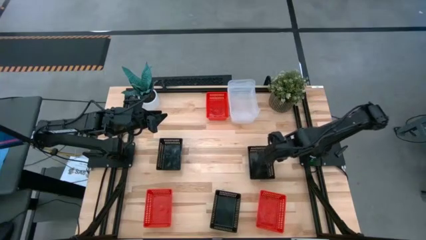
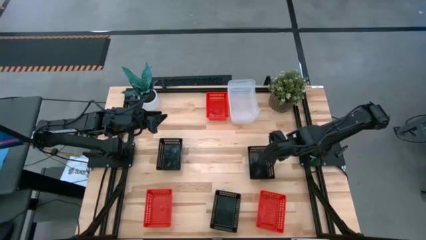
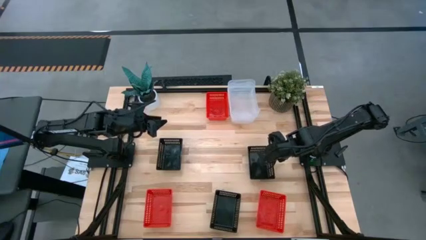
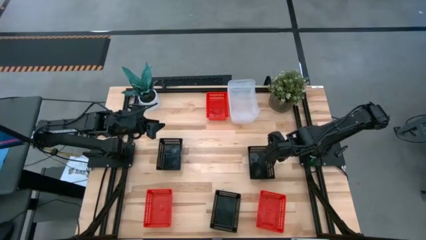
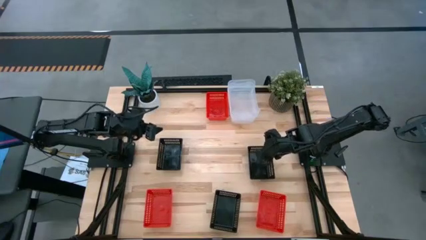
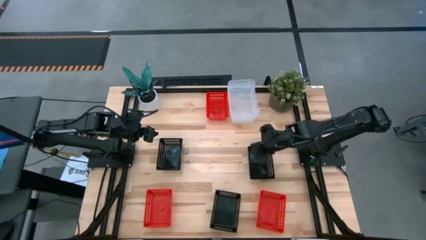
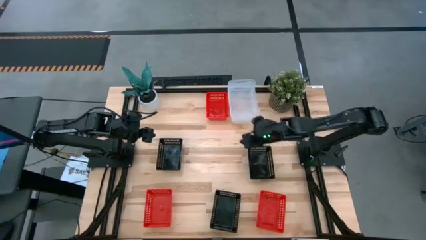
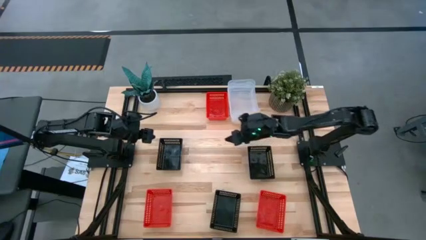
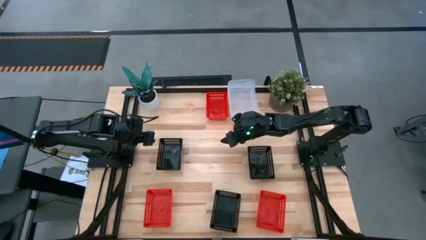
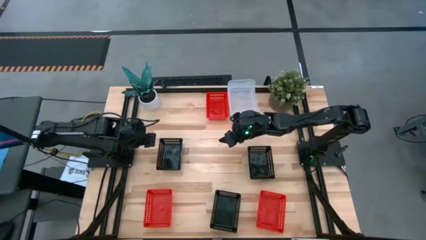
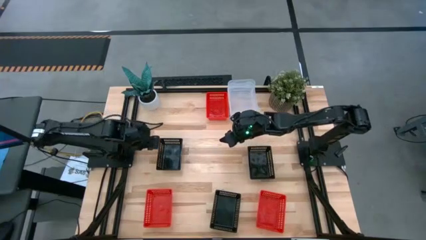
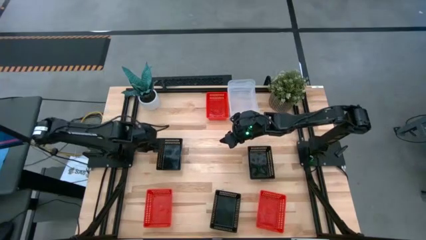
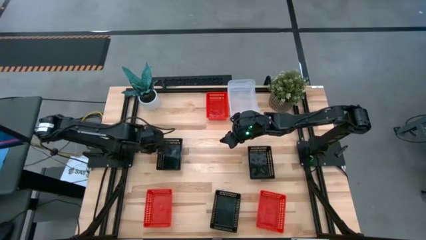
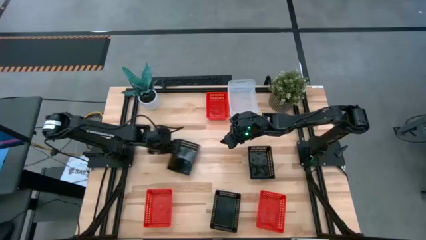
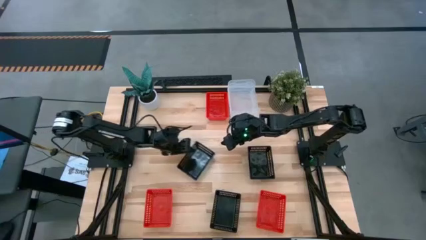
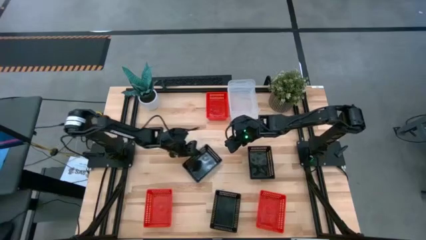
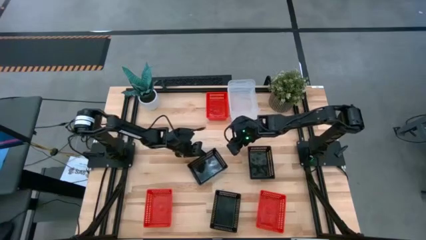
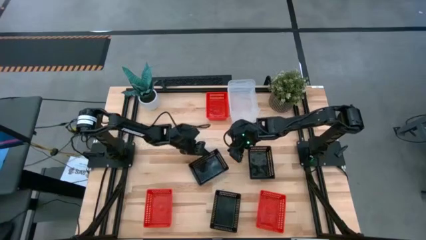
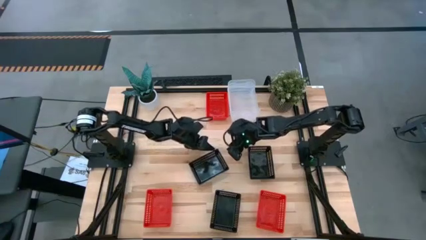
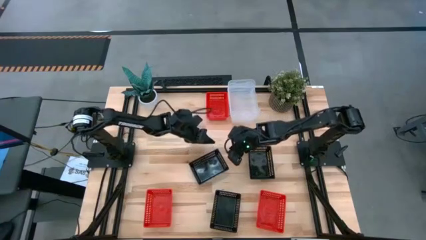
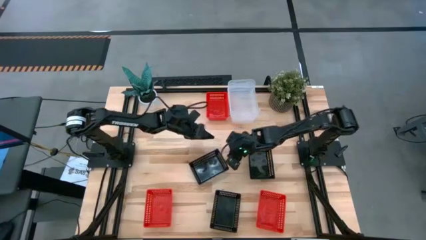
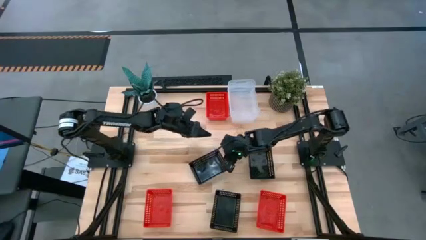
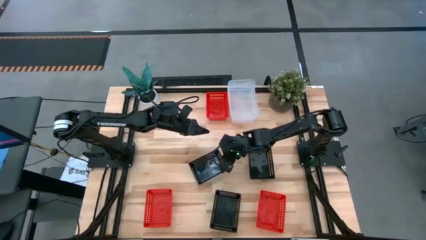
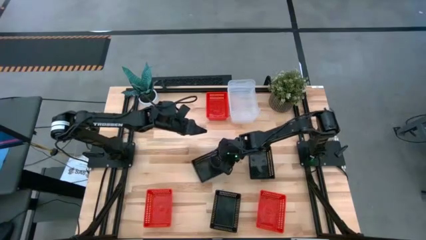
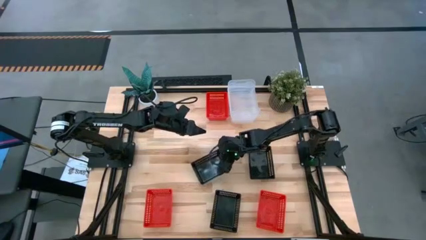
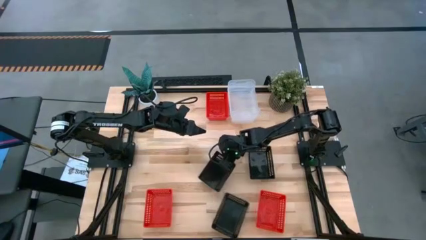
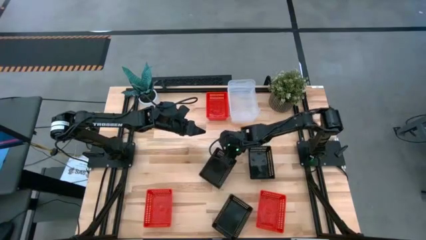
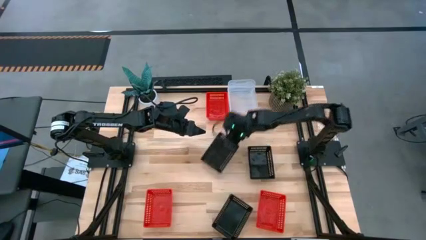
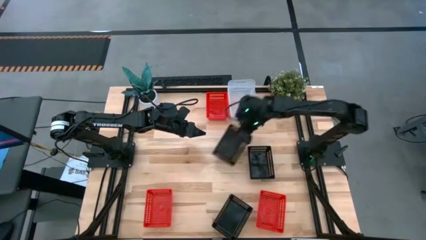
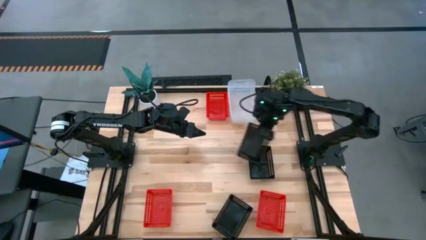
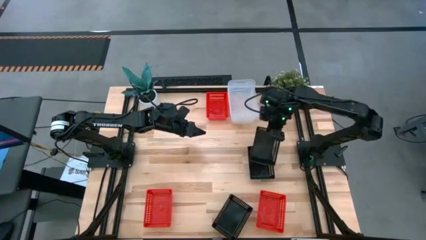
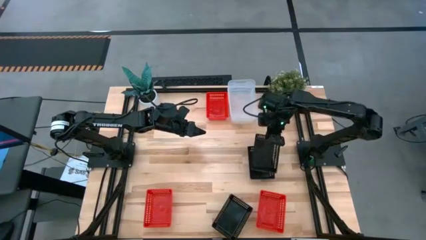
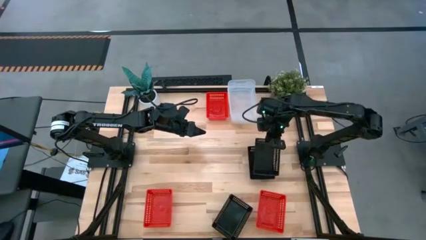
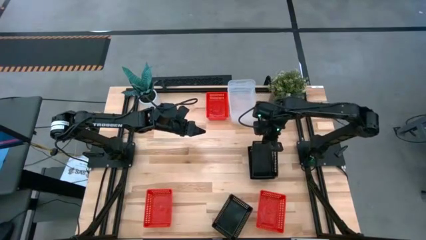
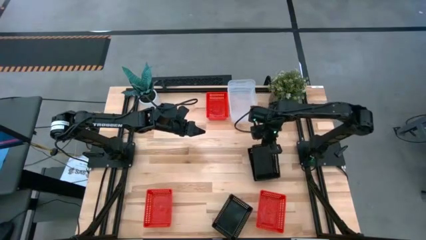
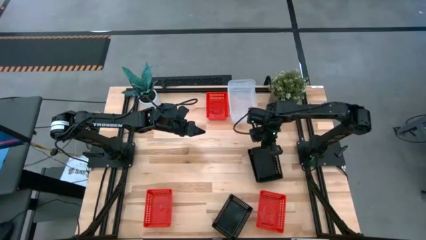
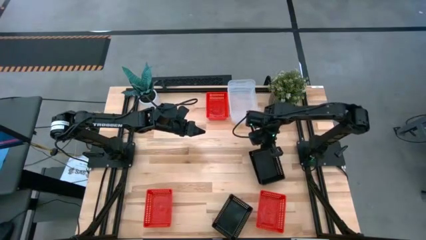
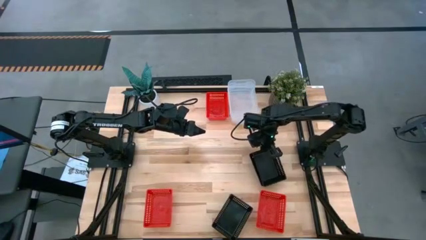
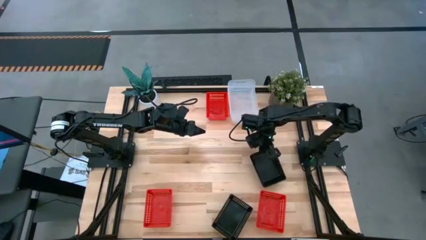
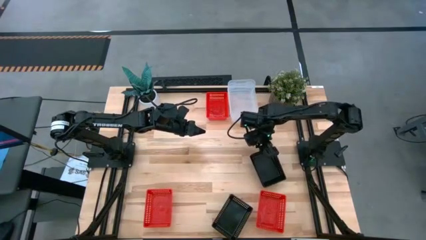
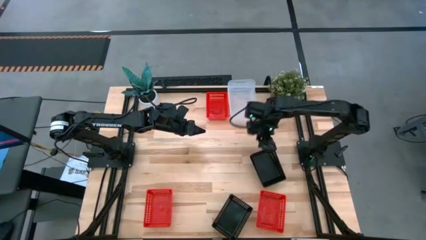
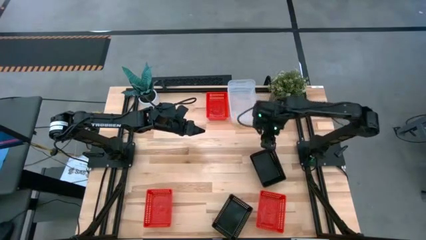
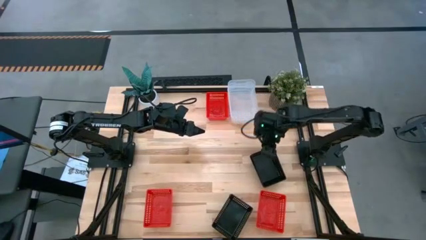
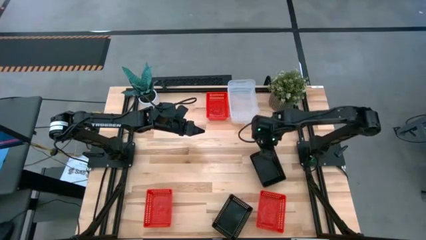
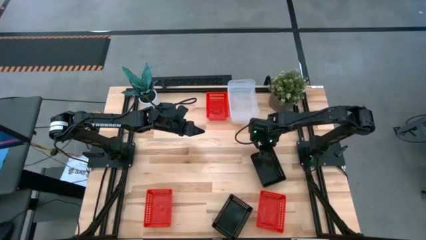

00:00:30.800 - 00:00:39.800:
Stack the left black bin on the right black bin

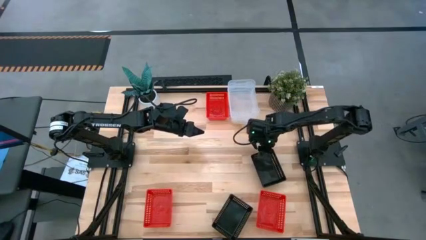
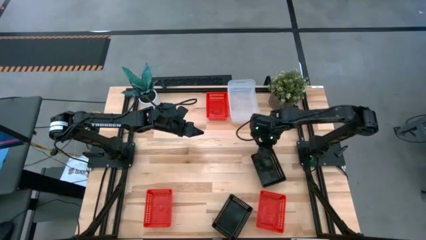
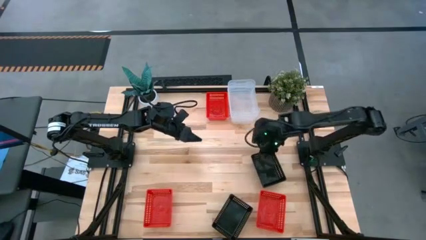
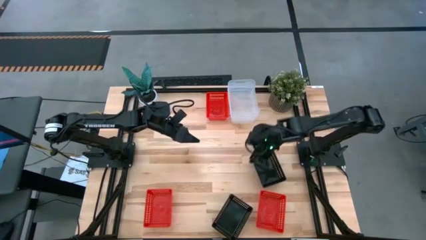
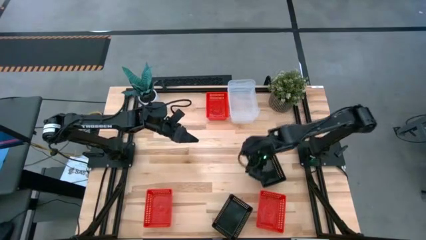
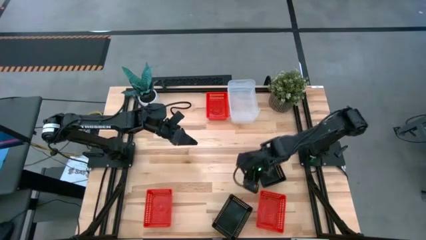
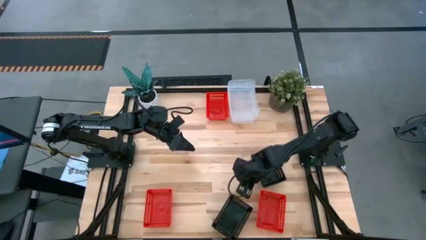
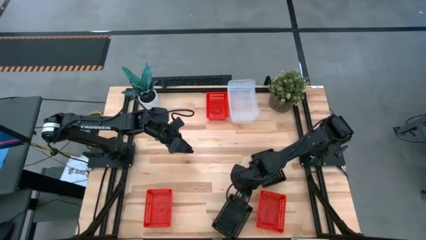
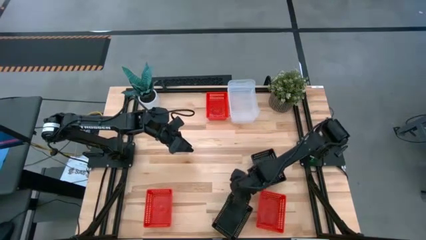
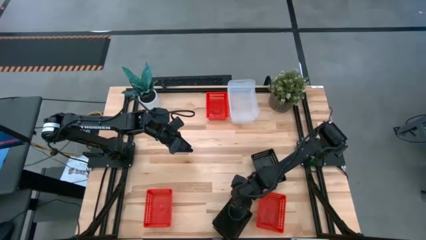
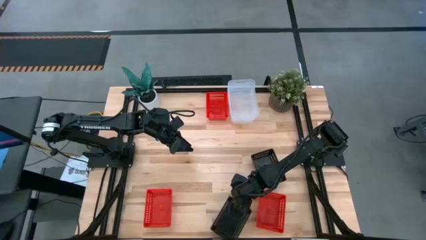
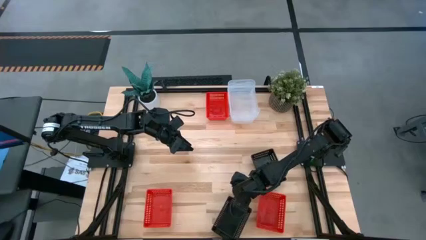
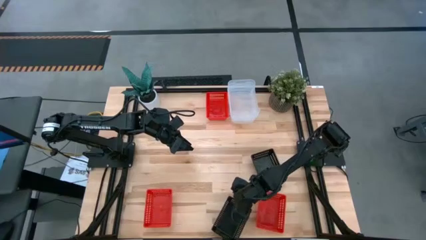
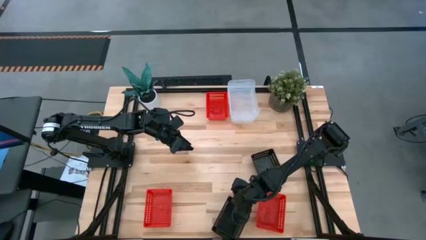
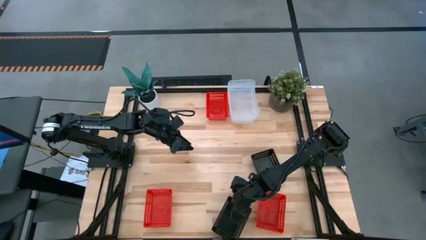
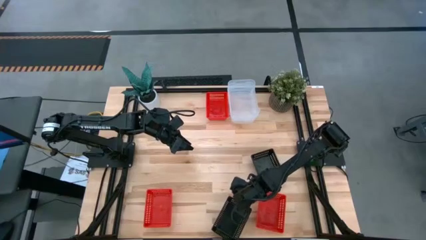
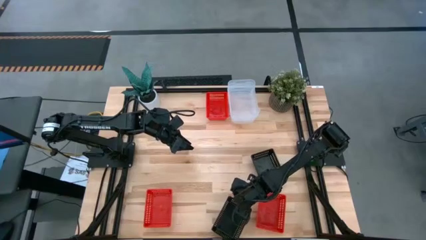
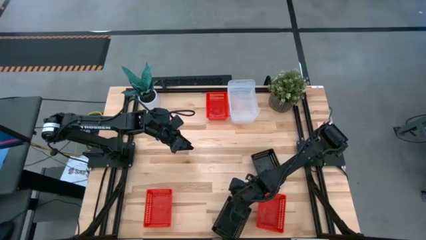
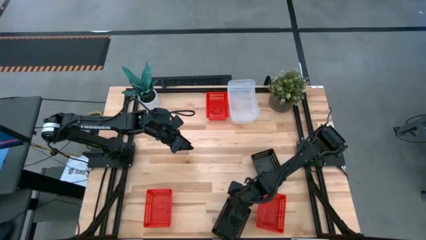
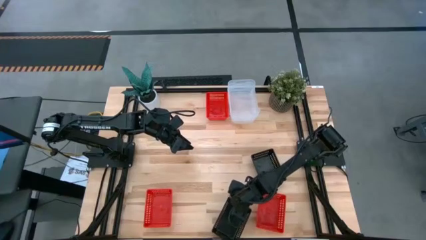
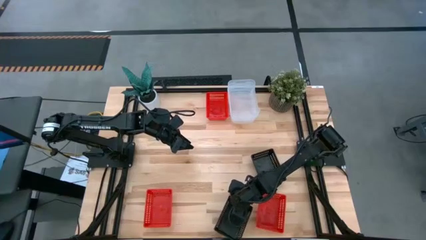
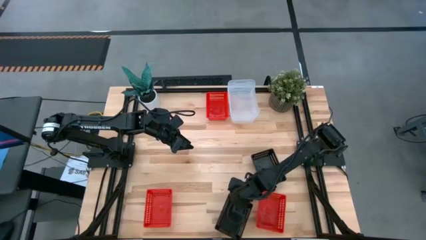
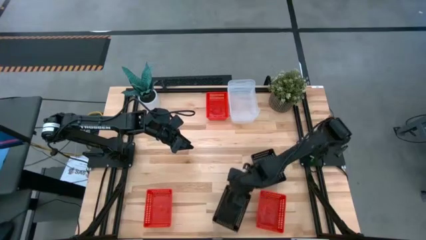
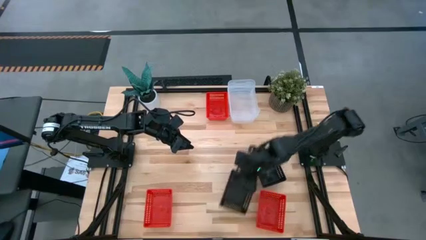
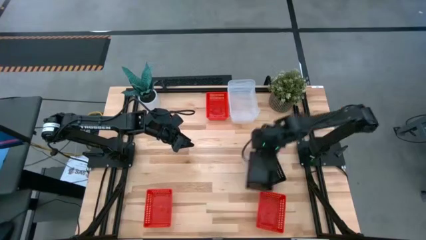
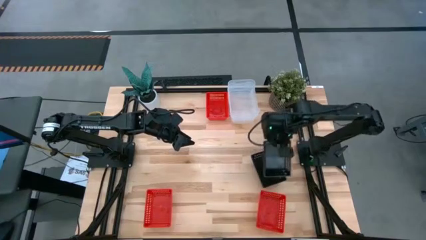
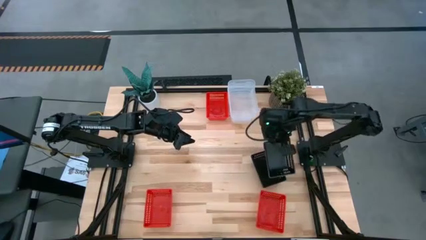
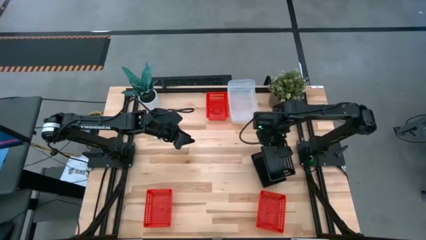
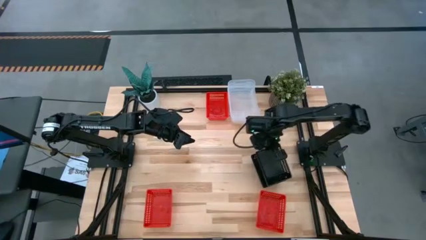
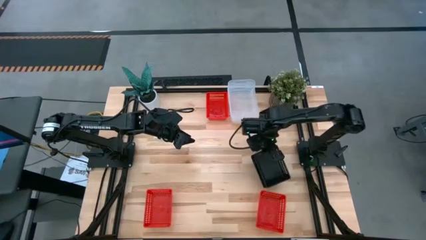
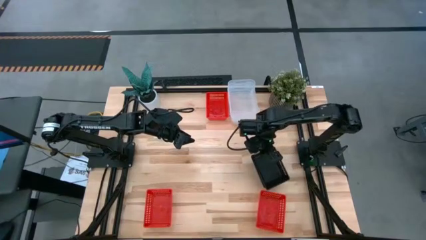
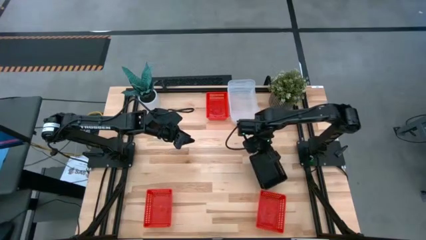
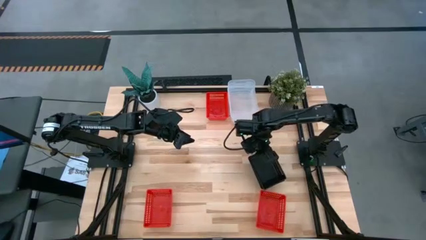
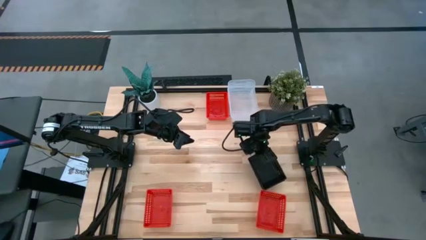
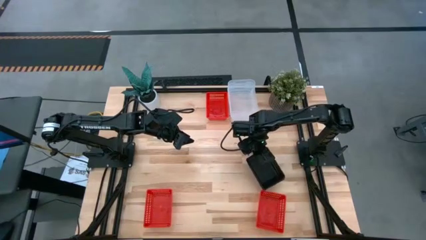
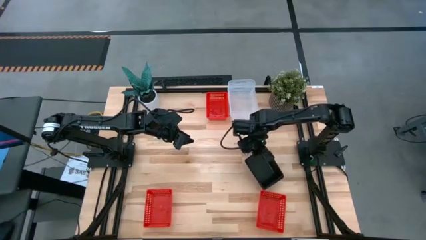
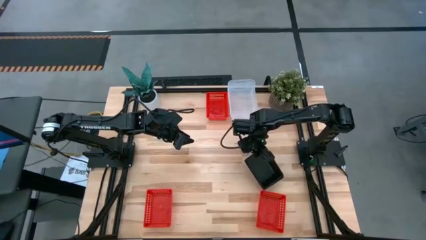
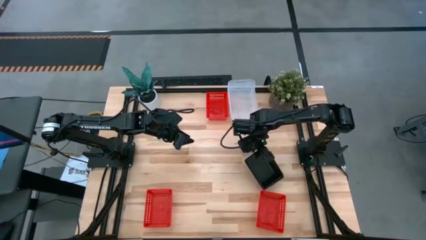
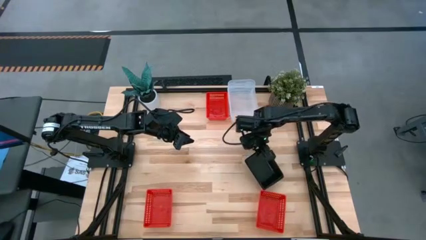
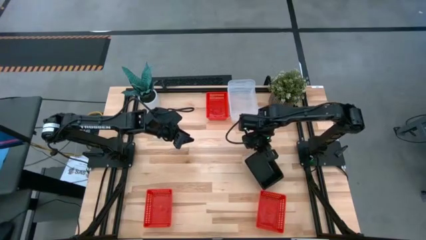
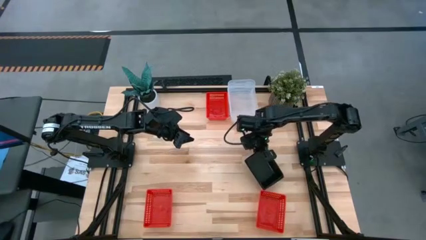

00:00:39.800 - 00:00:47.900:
Stack the bottom black bin on the black bin
